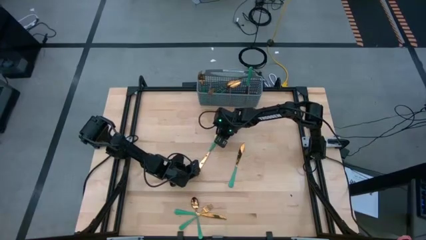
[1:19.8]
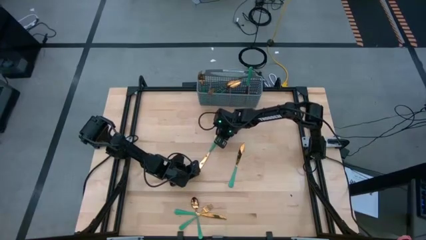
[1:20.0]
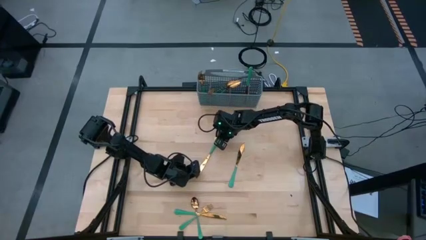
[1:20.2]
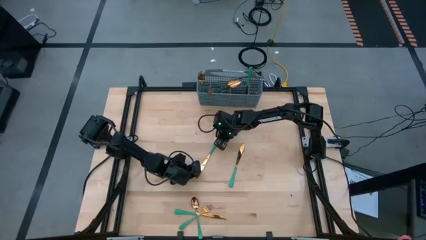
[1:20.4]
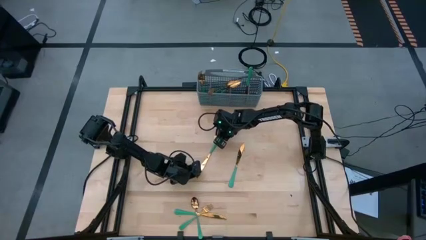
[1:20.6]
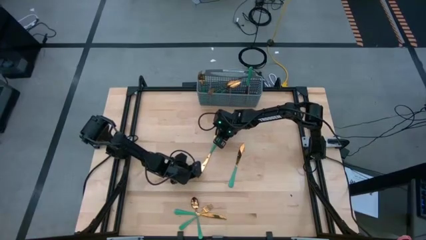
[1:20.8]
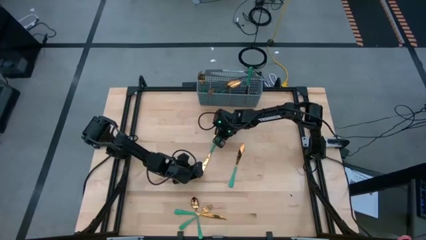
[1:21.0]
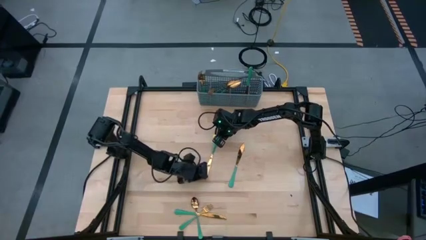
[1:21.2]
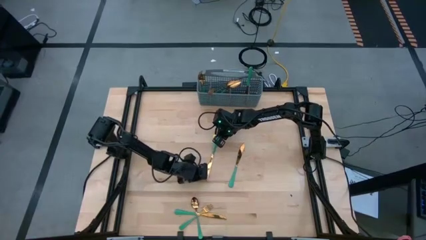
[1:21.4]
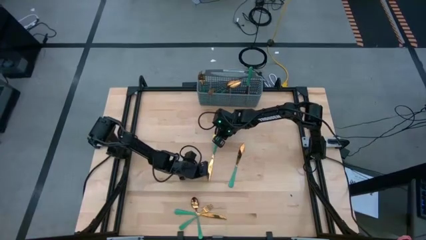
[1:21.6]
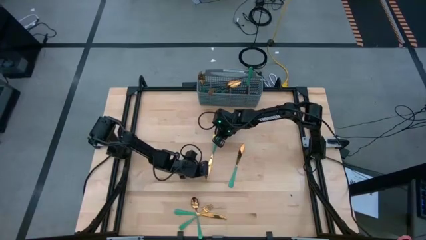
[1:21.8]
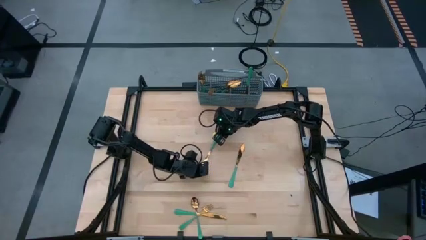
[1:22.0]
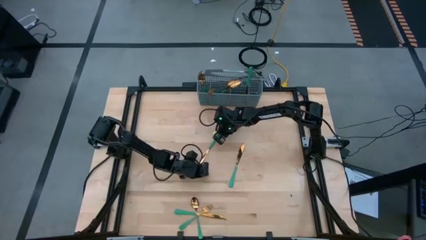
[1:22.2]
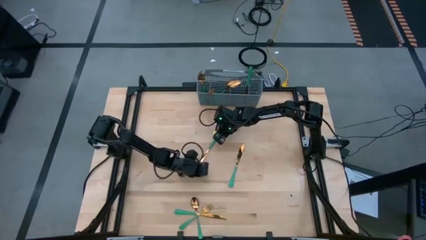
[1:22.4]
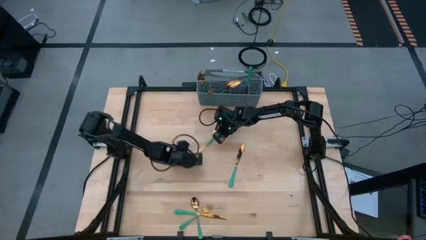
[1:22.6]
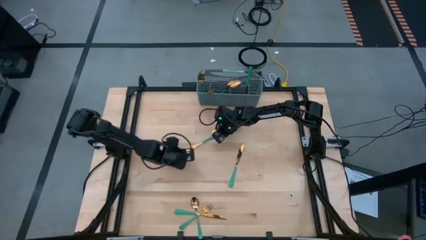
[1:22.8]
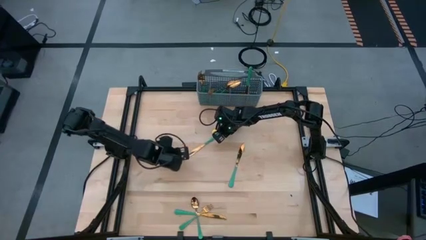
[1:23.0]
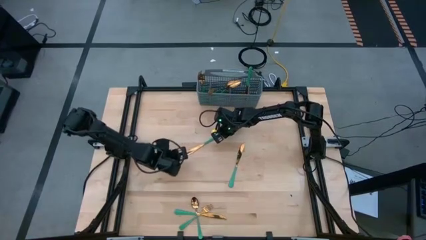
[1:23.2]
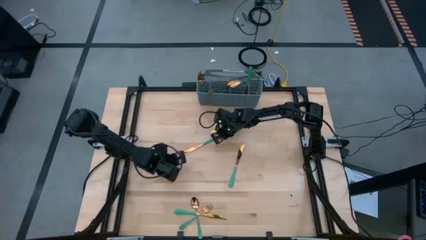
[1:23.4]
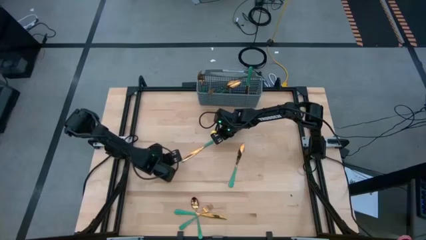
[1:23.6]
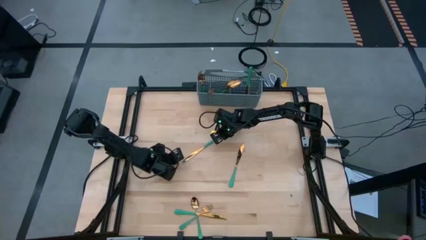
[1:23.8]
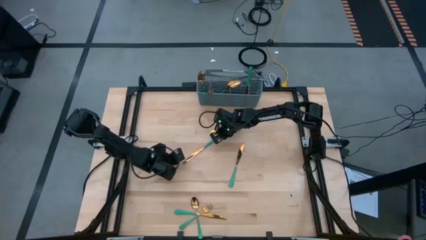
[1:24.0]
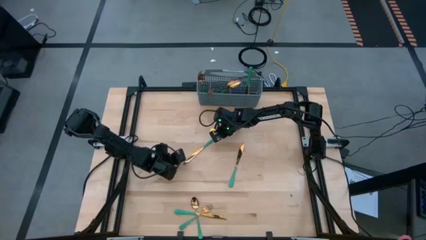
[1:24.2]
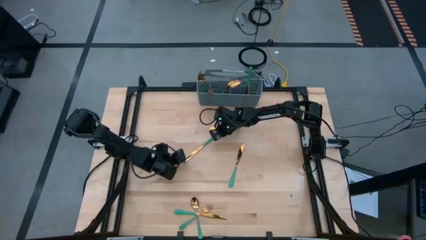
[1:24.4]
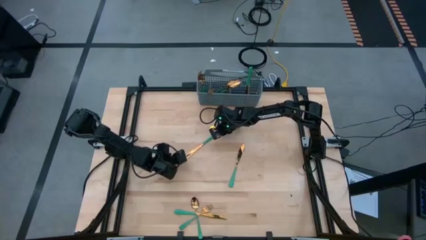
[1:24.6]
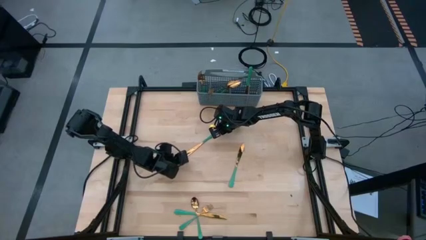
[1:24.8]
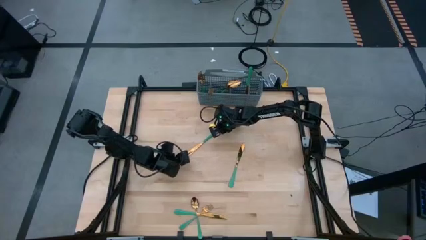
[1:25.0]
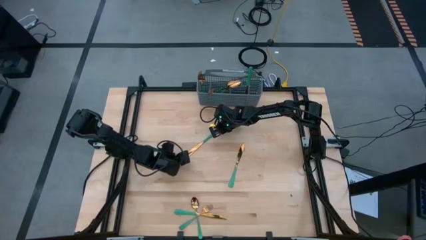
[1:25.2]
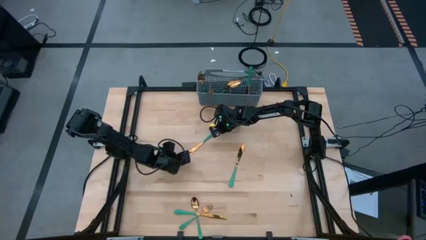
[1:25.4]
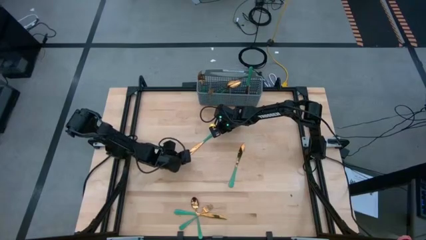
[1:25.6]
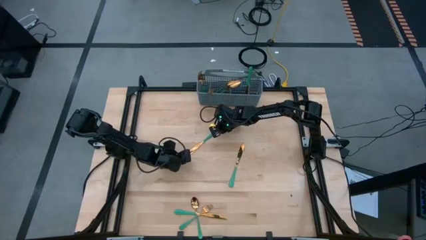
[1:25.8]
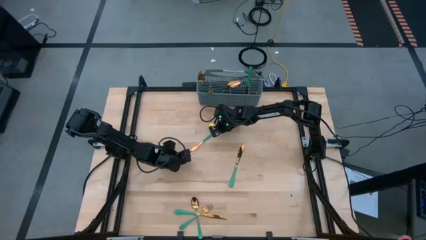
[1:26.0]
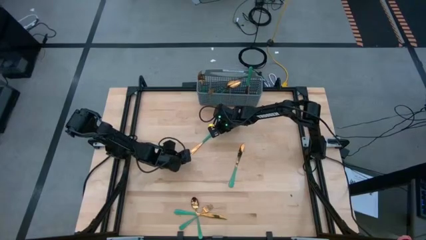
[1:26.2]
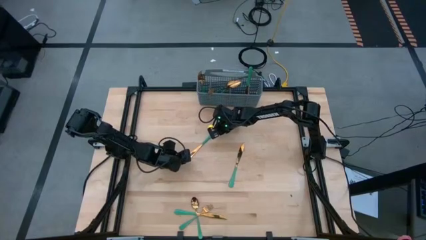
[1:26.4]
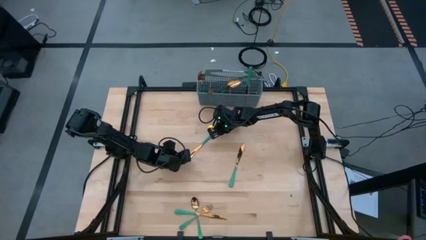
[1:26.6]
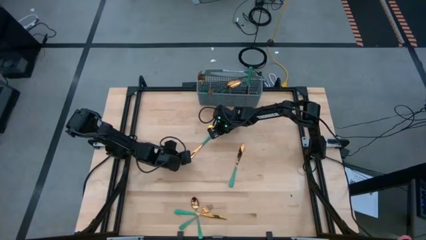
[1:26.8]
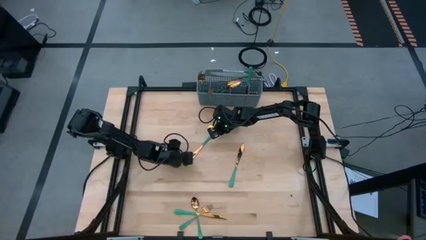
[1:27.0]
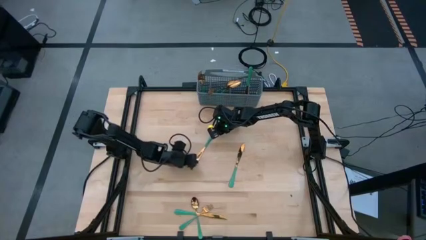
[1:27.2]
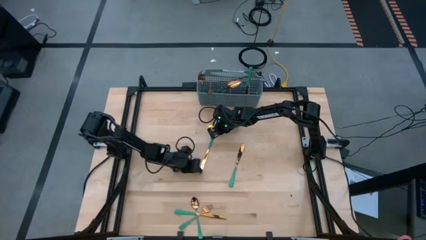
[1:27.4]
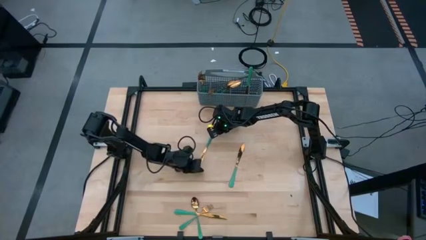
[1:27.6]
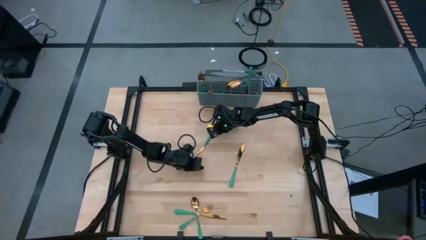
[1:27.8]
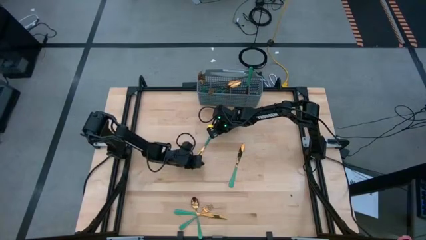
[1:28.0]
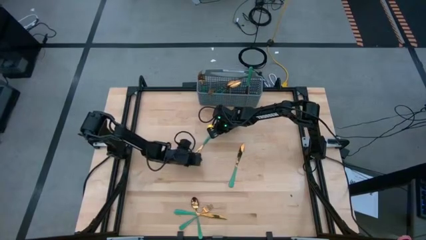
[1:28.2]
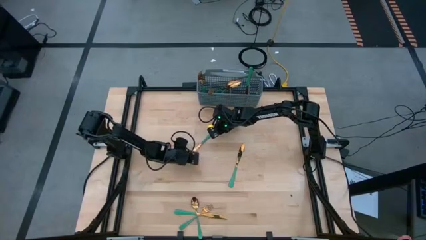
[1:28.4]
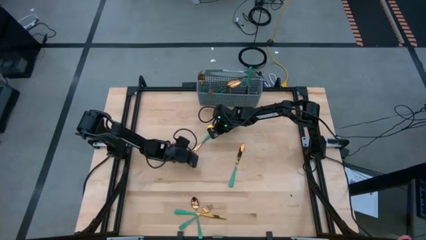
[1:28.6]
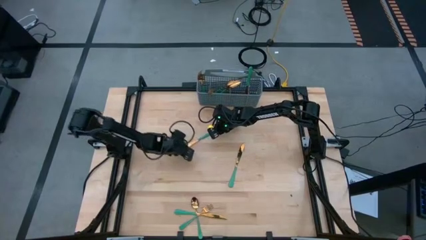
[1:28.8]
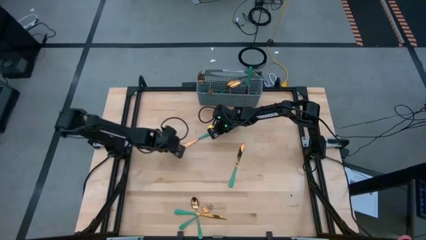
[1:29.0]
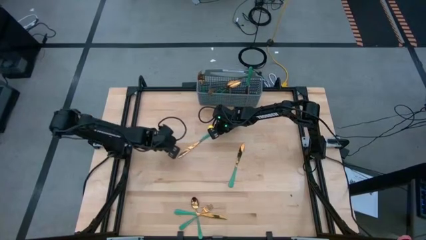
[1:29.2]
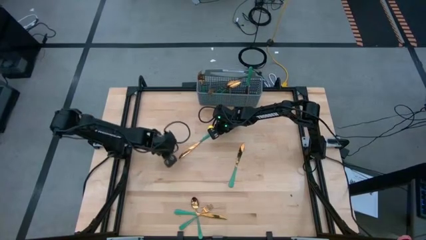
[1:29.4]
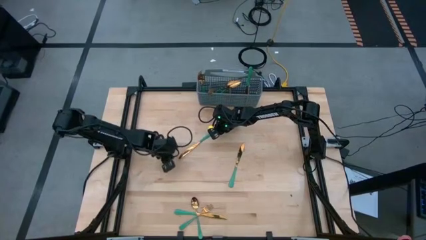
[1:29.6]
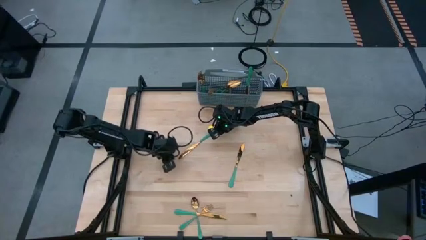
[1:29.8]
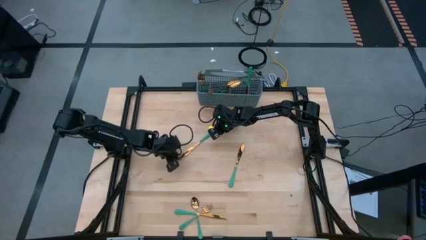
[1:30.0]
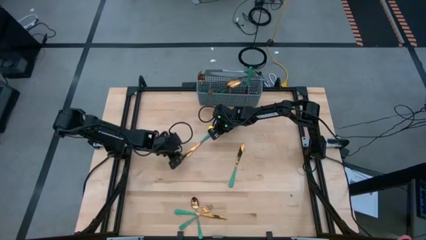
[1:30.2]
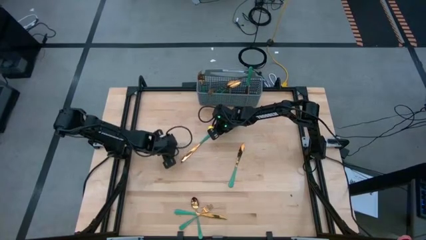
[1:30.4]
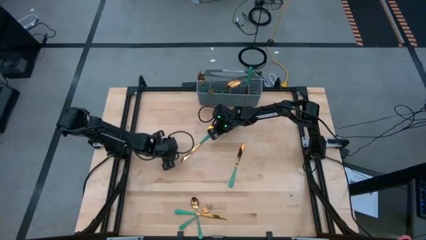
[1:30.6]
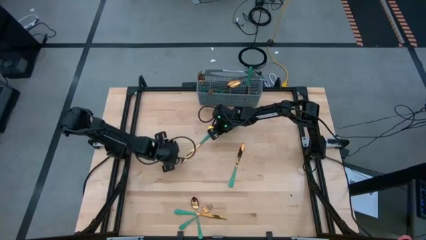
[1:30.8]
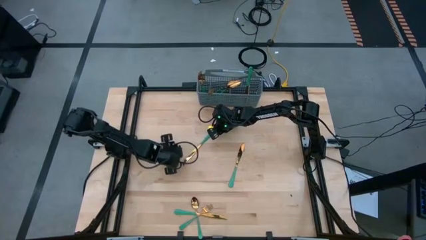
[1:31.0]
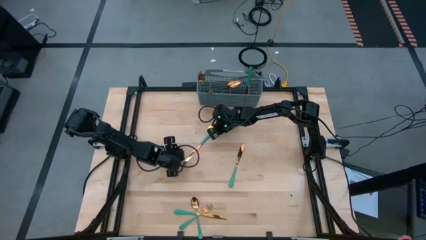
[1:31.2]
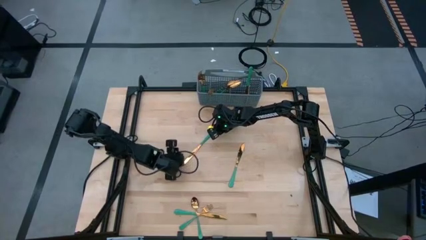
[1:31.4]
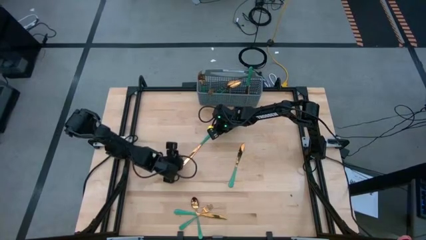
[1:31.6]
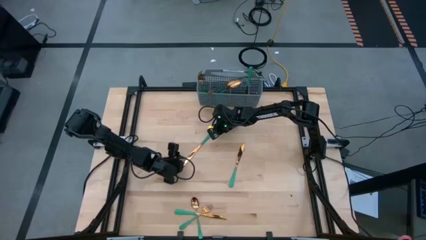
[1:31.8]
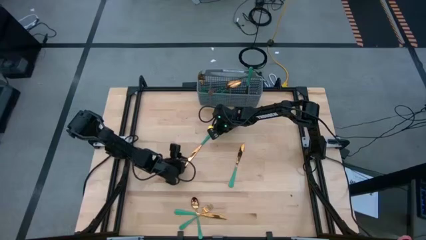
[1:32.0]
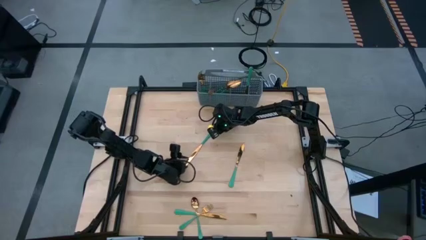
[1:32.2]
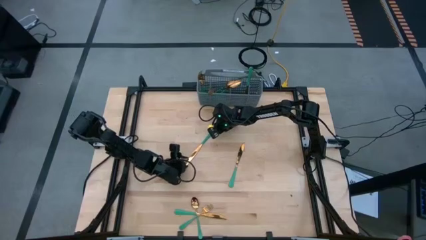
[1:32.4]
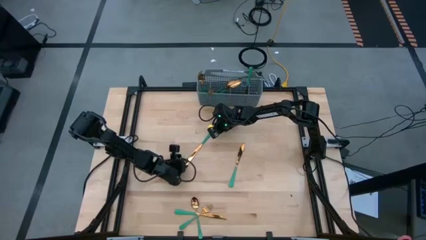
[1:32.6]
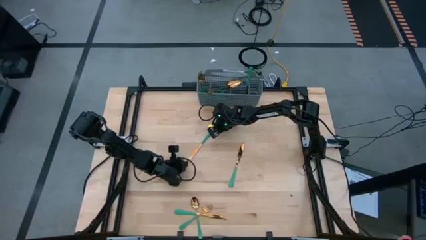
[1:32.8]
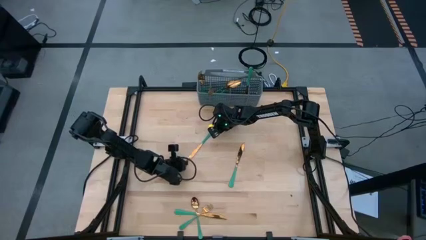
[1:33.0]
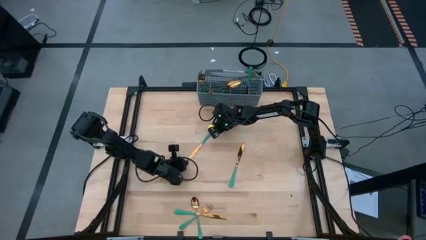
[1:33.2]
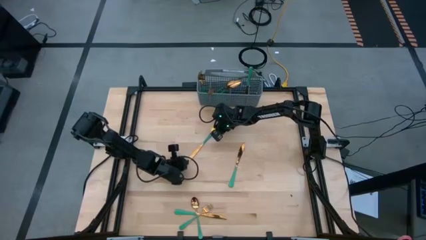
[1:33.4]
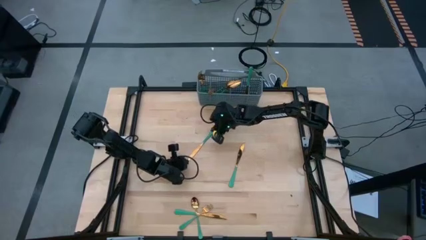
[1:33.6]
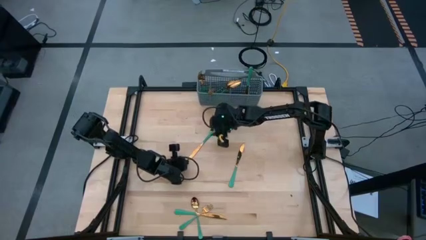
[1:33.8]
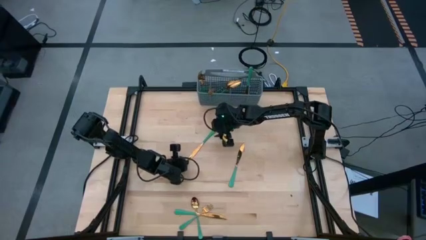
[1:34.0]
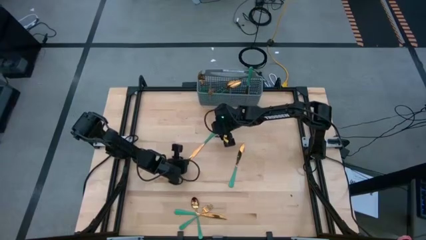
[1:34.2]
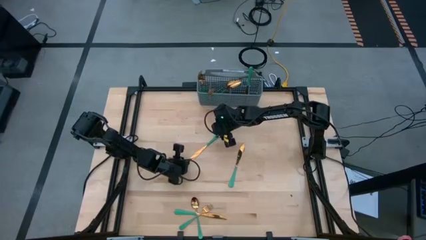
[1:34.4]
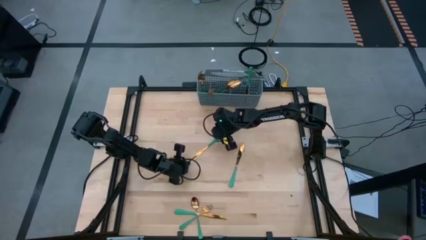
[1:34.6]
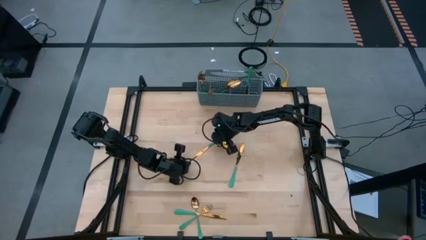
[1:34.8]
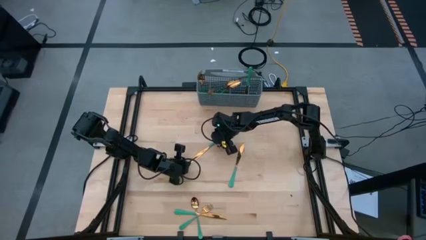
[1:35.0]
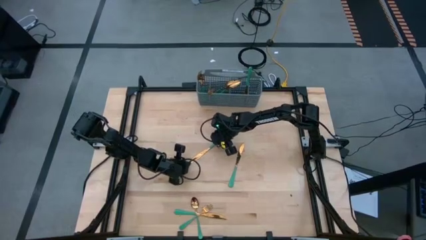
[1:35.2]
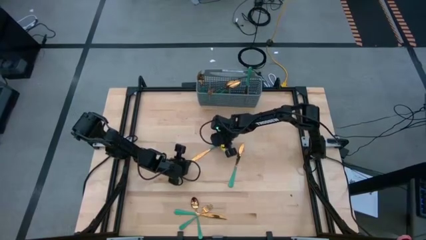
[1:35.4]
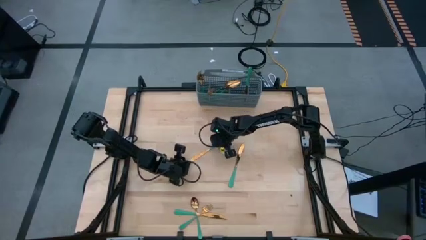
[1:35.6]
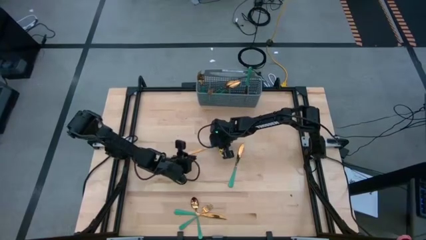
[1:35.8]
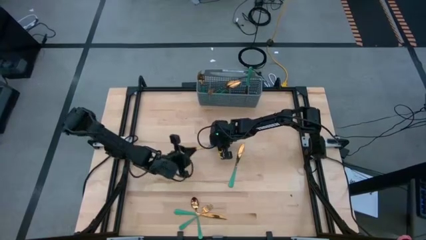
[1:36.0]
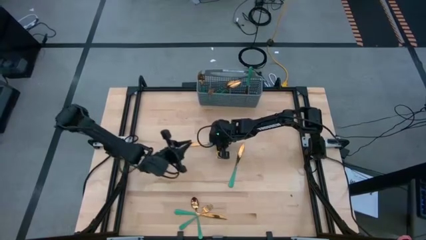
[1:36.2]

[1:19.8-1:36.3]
Task: Sort silverware
Put the green table knife into the gray silverware basket with the other table knife
